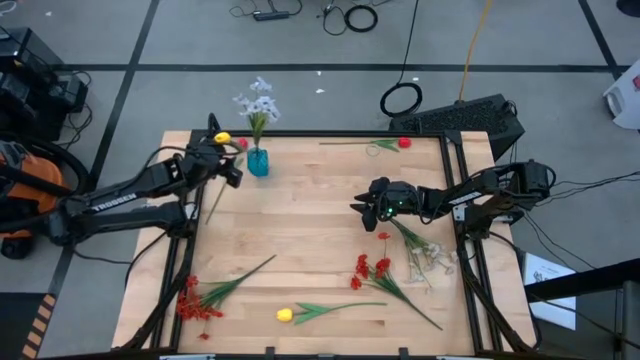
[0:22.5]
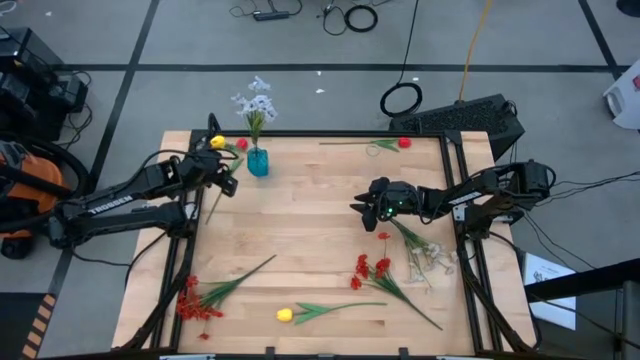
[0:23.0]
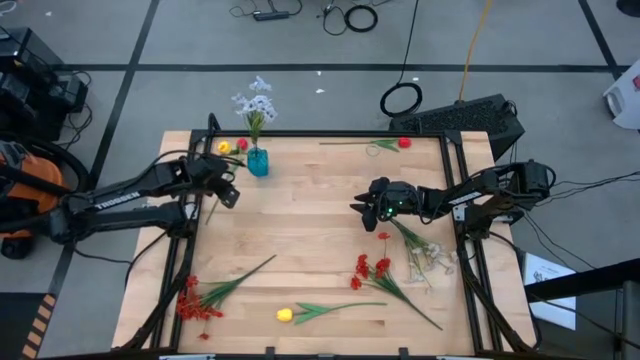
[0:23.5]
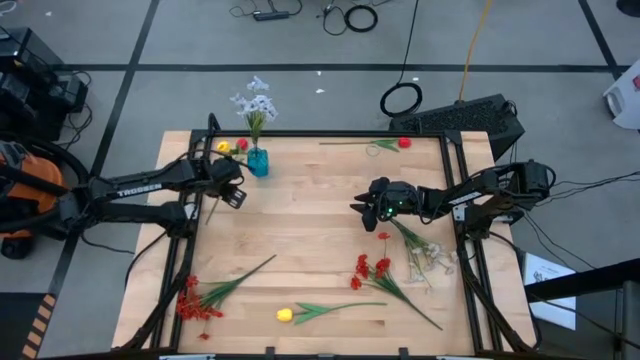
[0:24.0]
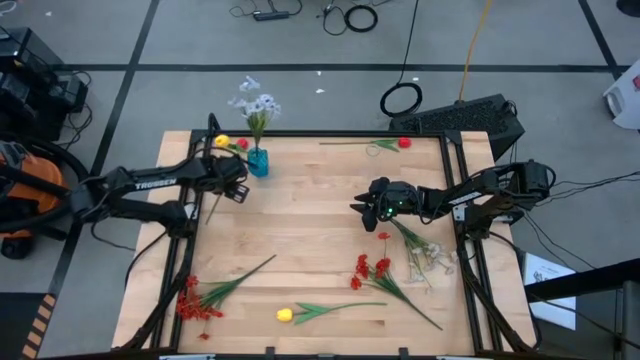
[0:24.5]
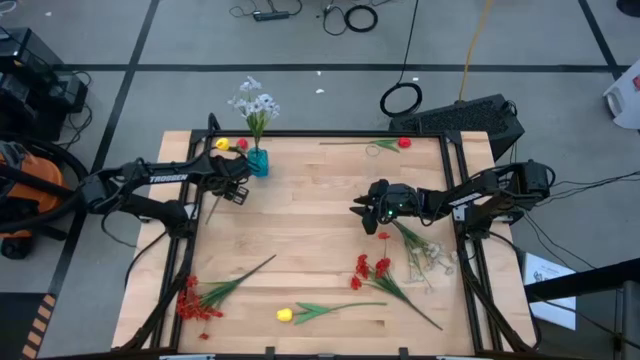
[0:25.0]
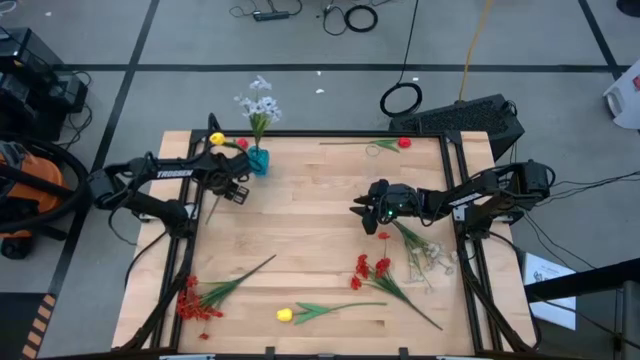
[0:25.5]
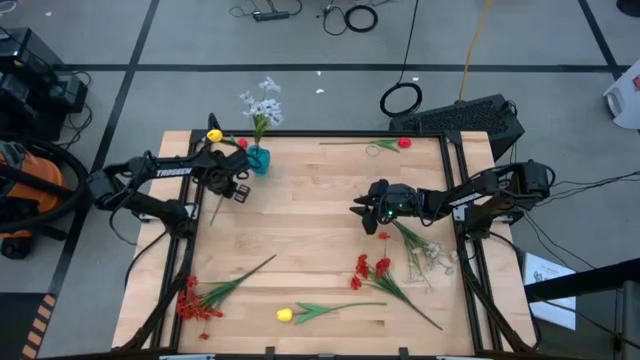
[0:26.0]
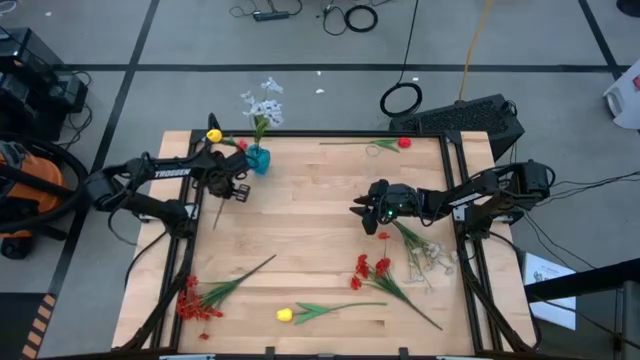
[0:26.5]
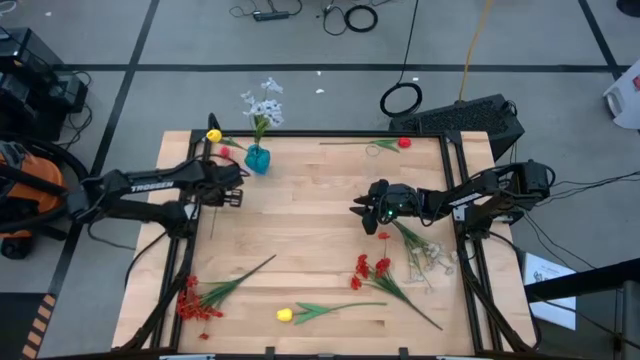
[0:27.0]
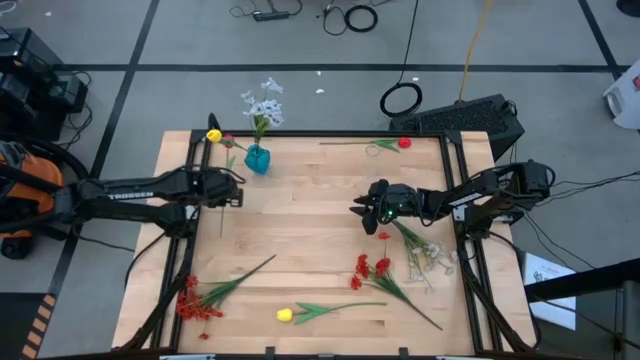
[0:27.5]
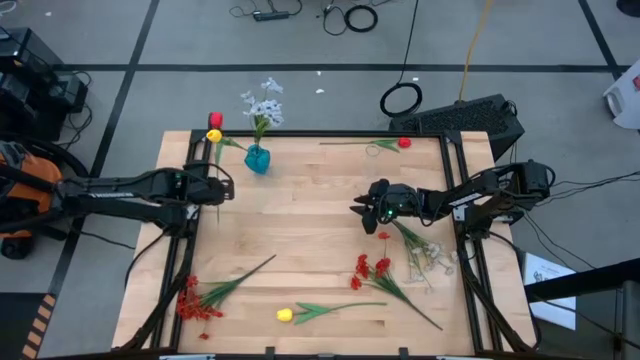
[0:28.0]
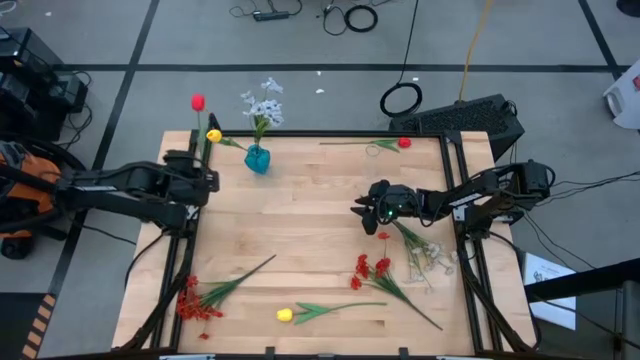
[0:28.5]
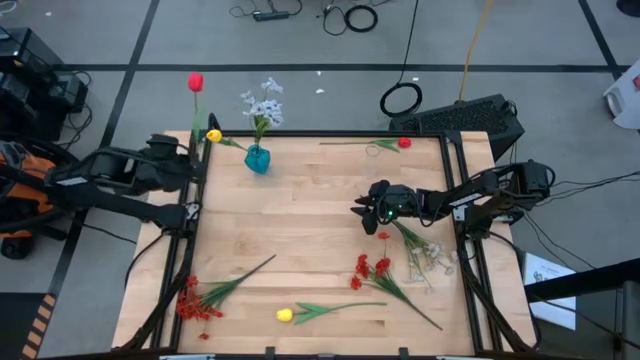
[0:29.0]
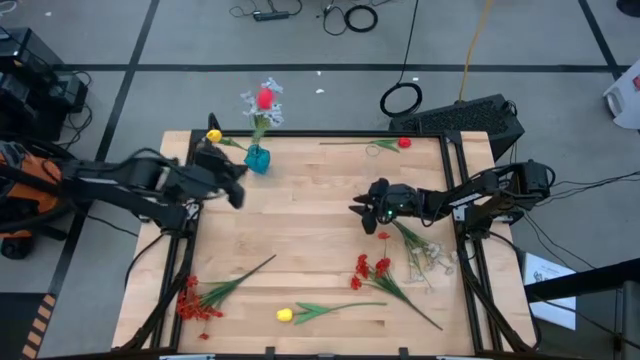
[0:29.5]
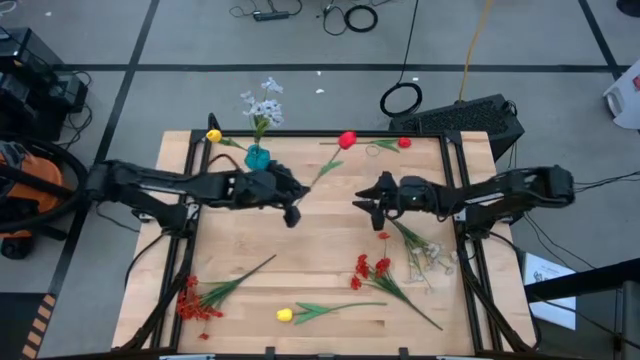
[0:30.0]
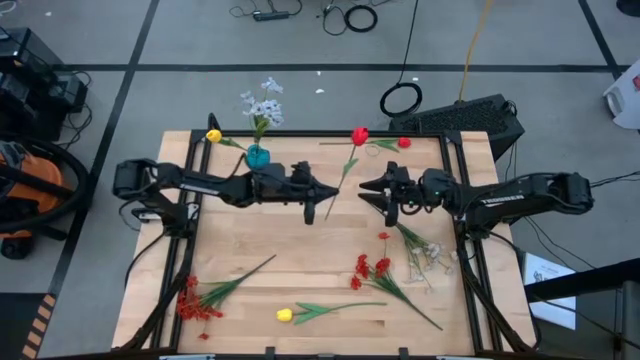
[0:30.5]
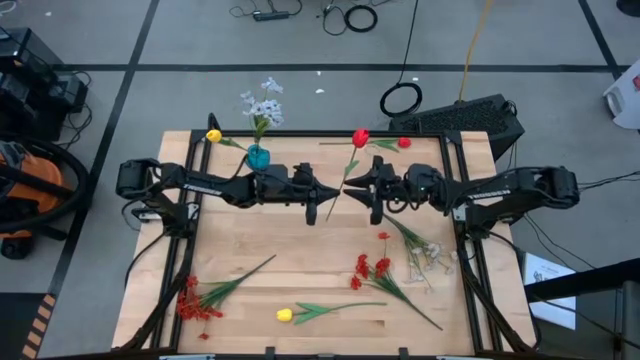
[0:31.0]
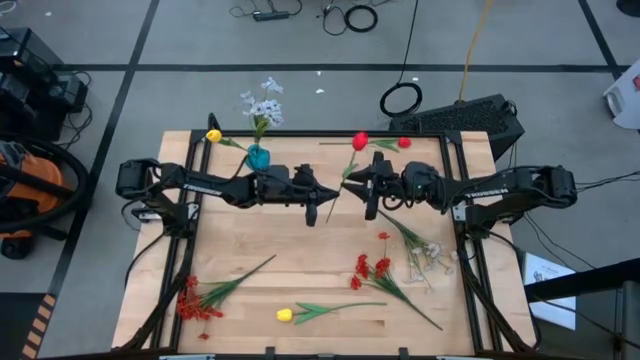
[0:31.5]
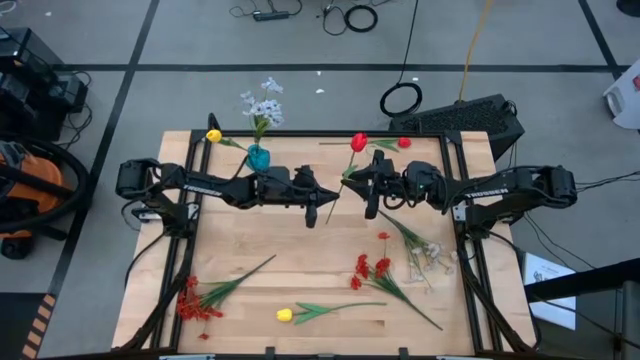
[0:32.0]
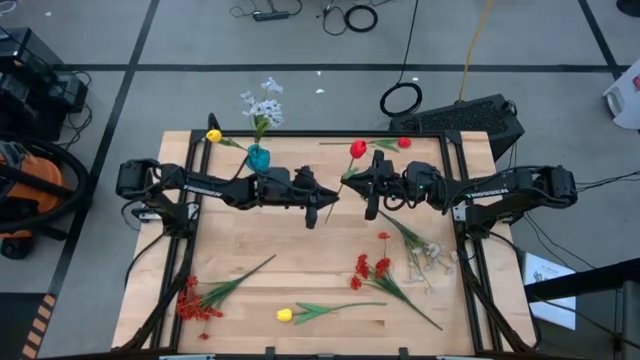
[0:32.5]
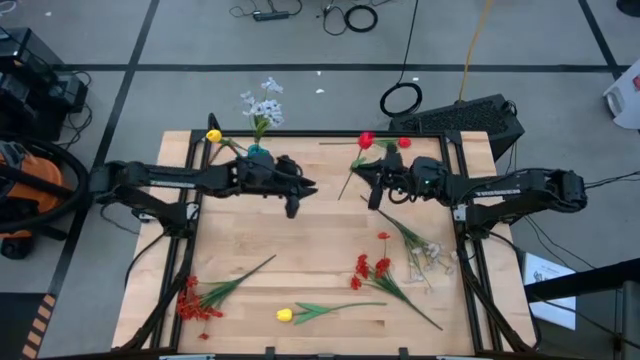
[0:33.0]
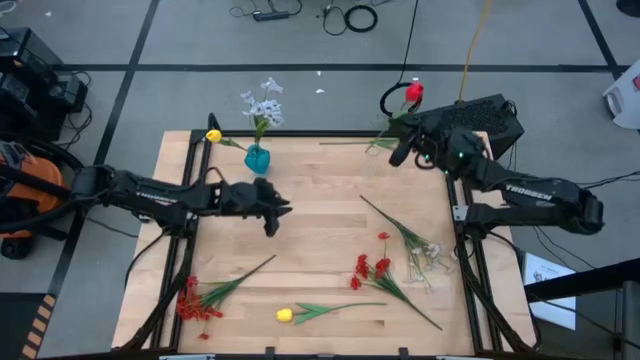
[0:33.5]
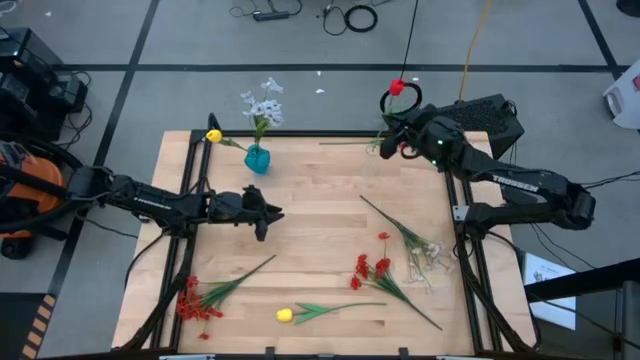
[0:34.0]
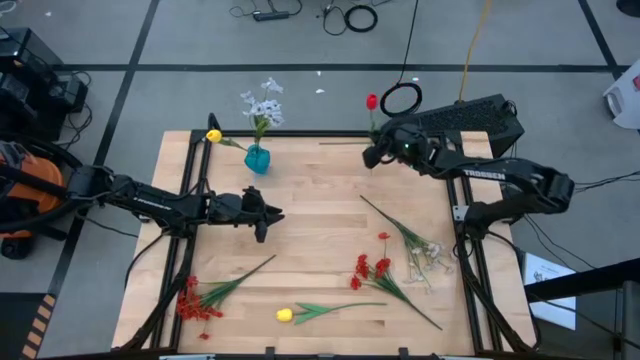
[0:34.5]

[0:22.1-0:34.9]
Task: Sort flowers into vase by color
Put the left red flower into the transparent vase

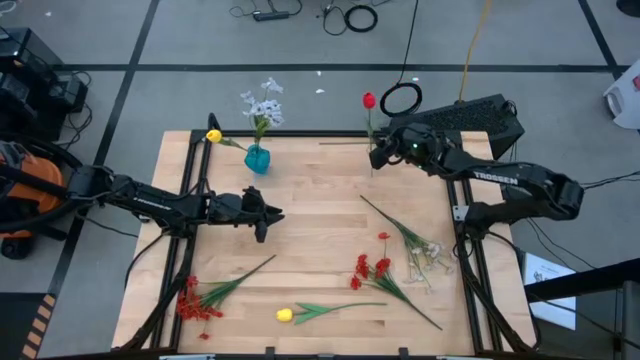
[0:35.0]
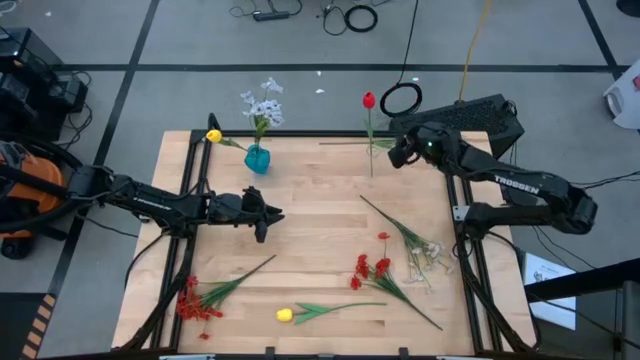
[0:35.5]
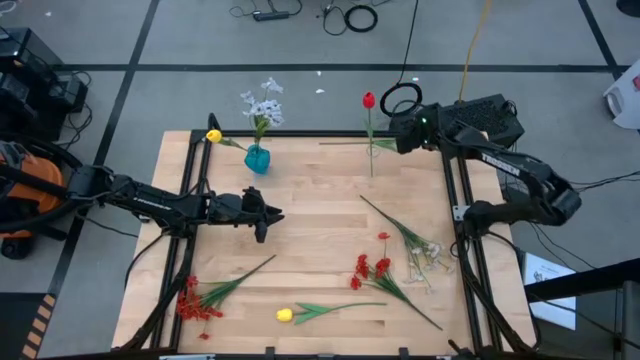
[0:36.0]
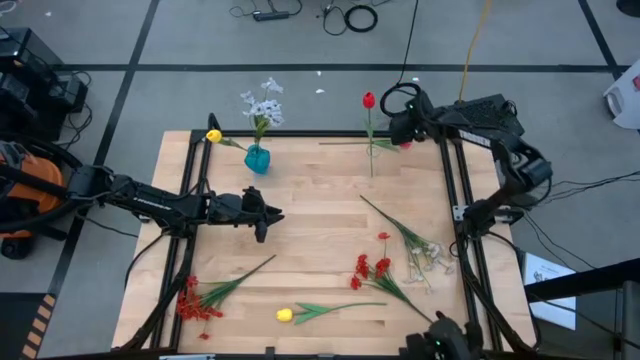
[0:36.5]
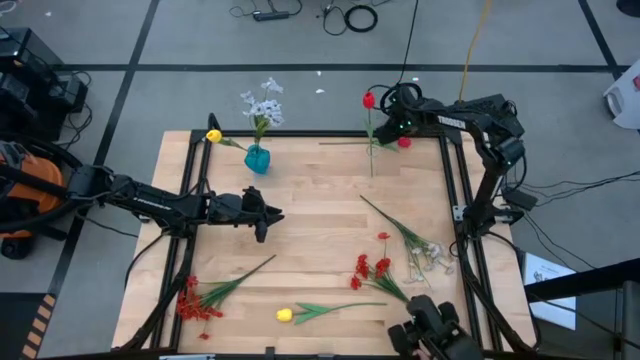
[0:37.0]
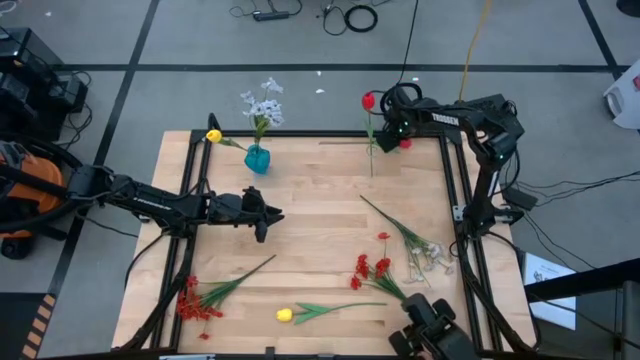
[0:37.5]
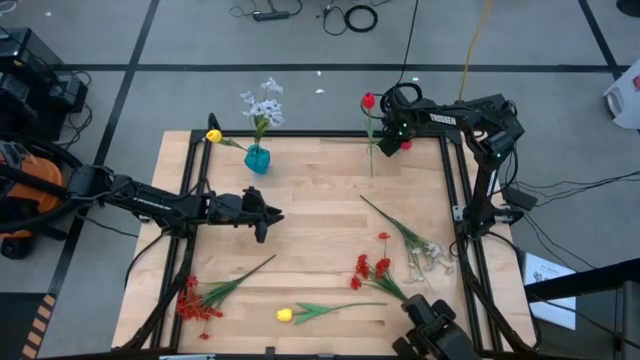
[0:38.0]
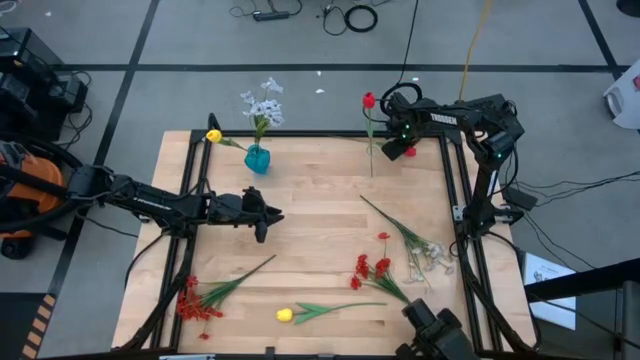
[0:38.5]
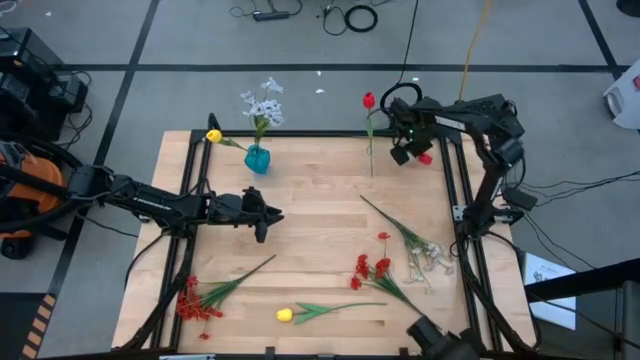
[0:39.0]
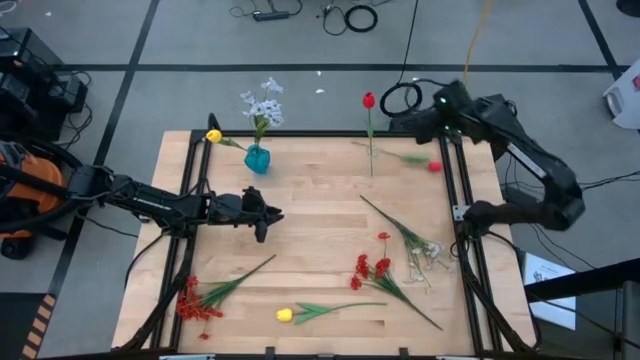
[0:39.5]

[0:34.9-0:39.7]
Put the red flower into the transparent vase

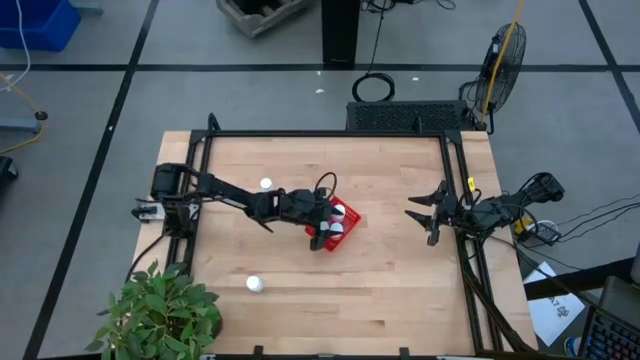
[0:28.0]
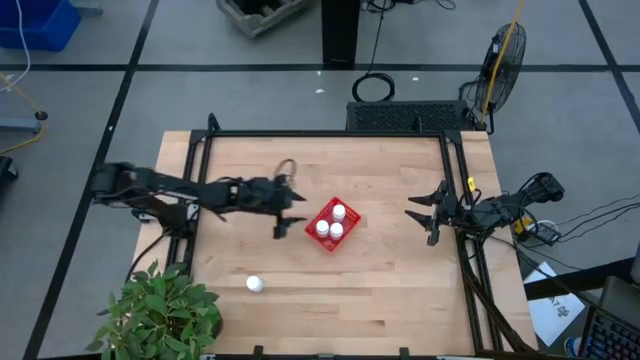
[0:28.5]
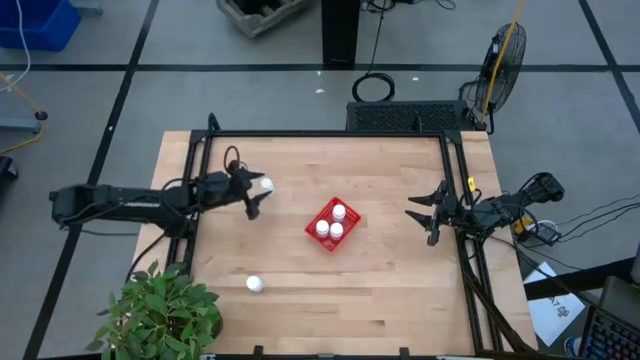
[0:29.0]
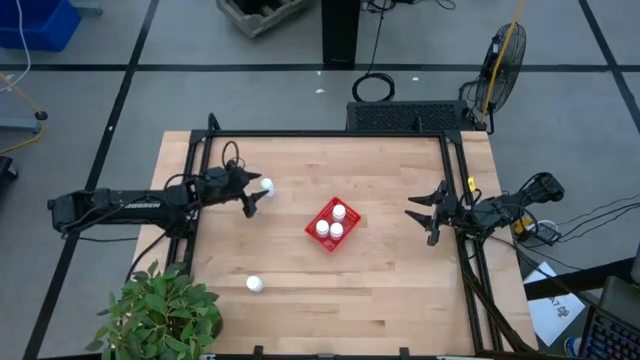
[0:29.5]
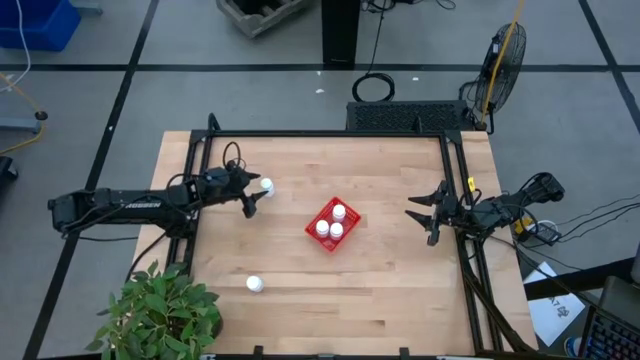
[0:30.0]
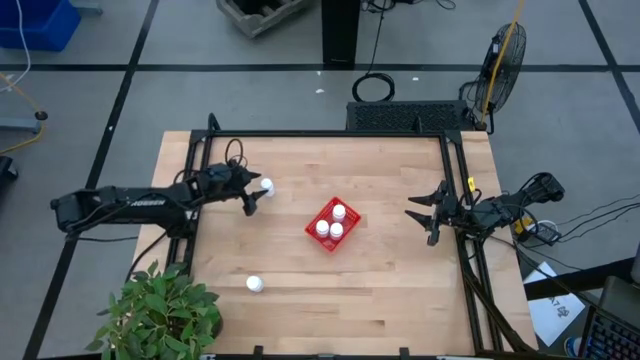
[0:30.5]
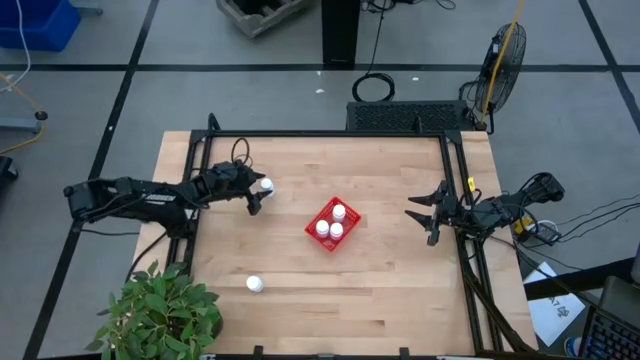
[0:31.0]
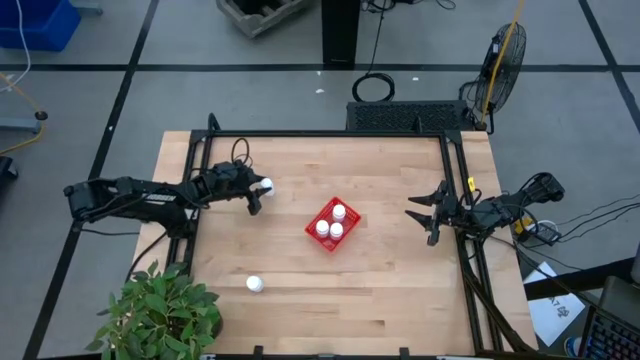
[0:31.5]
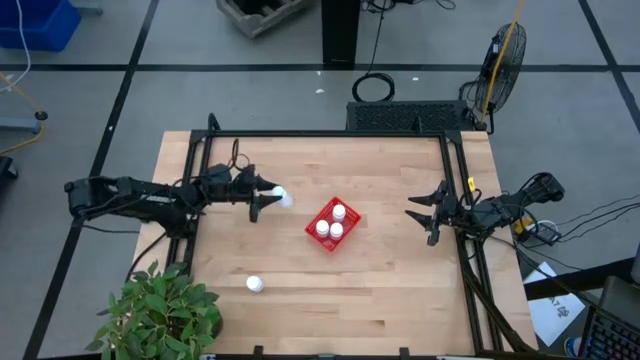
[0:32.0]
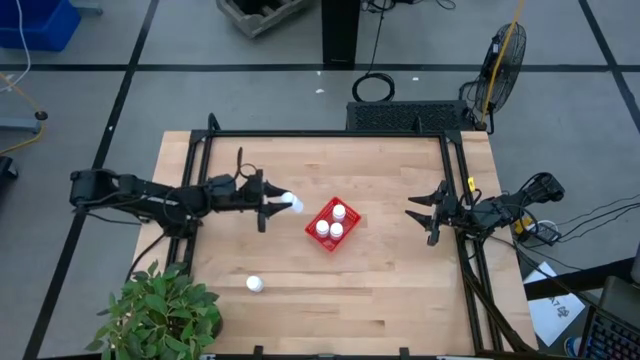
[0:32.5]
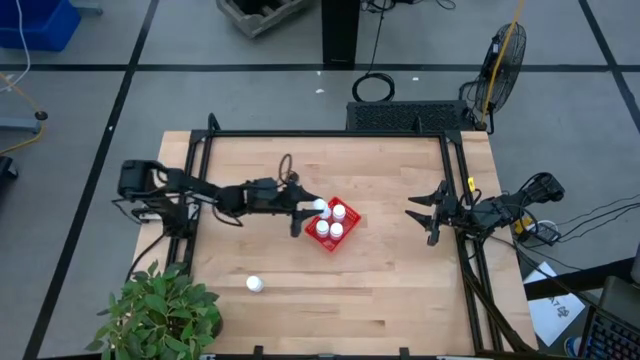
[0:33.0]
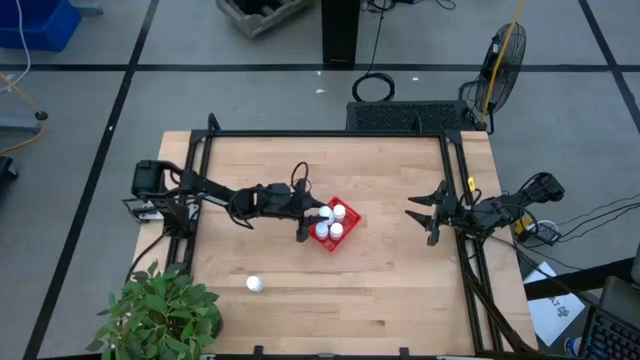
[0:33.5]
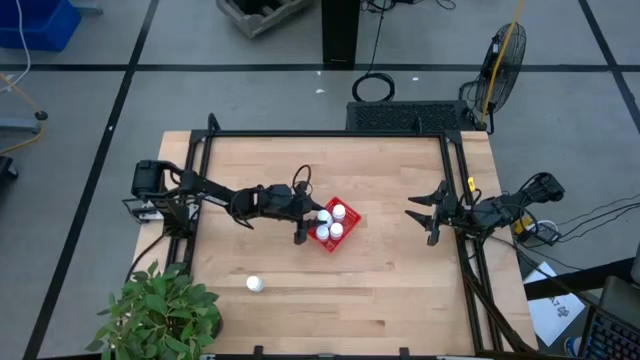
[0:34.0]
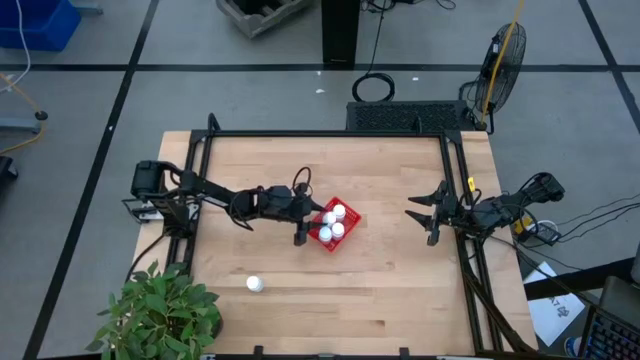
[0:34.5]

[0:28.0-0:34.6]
Task: Pick and place pill bottles into a basket
Put the white medicine bottle into the red bin
